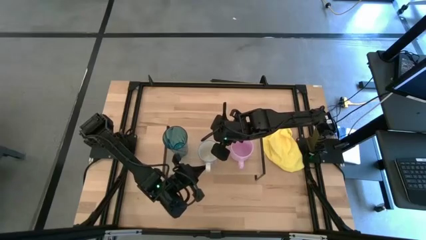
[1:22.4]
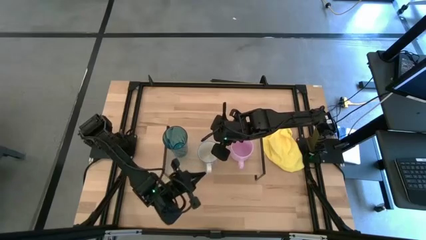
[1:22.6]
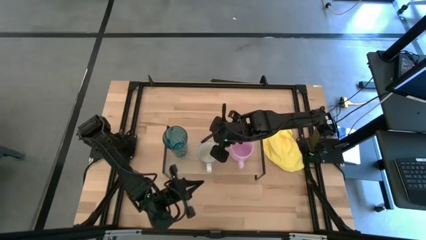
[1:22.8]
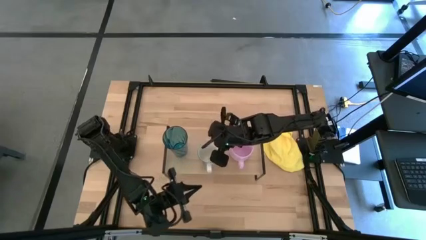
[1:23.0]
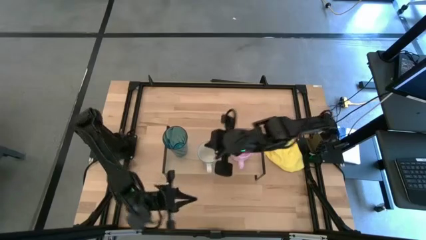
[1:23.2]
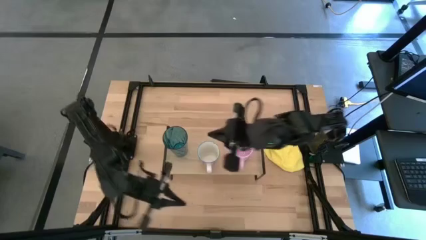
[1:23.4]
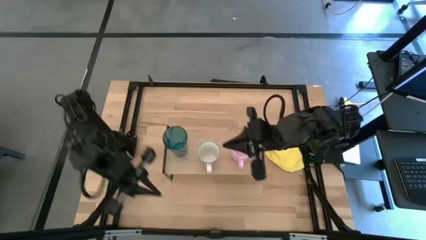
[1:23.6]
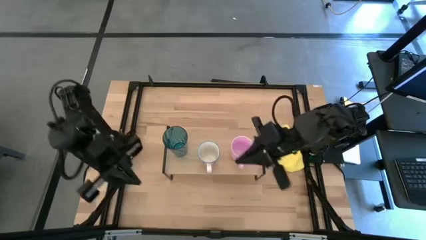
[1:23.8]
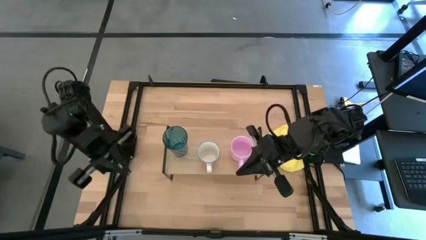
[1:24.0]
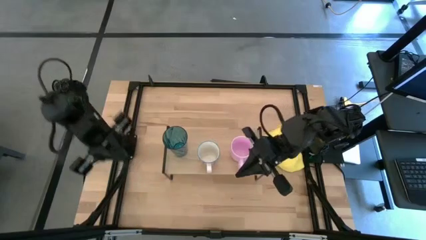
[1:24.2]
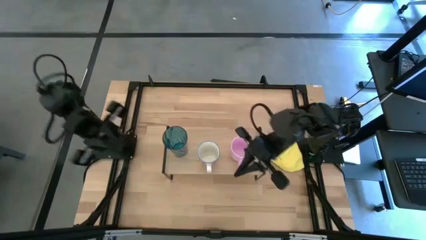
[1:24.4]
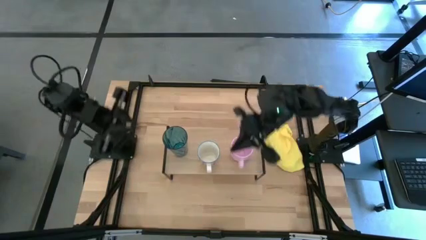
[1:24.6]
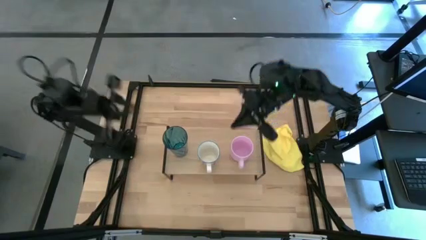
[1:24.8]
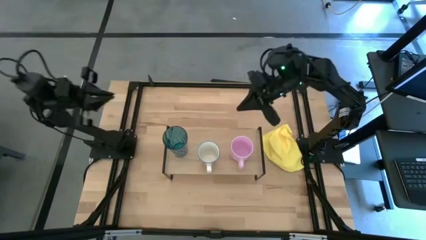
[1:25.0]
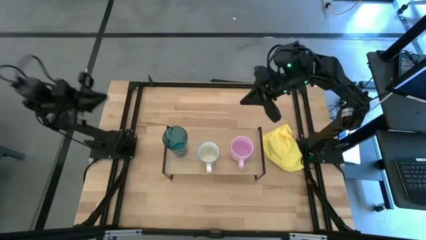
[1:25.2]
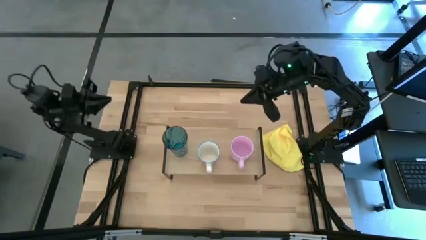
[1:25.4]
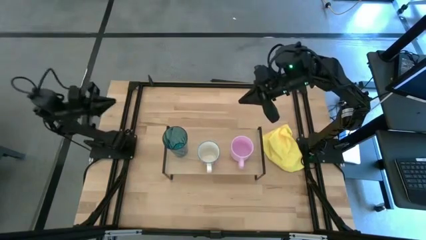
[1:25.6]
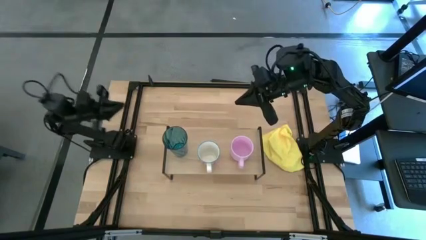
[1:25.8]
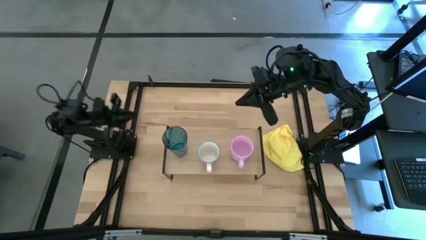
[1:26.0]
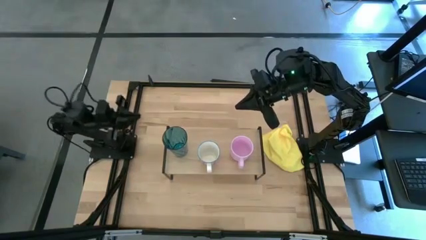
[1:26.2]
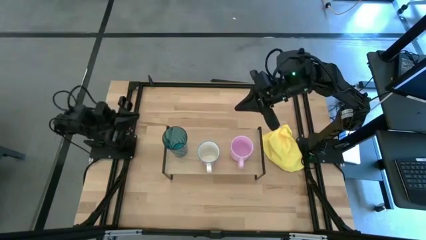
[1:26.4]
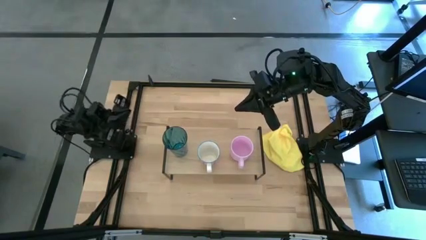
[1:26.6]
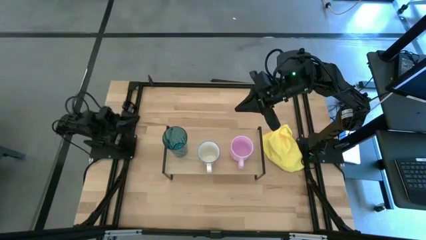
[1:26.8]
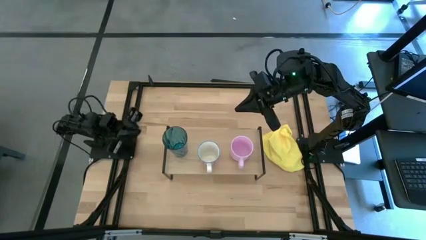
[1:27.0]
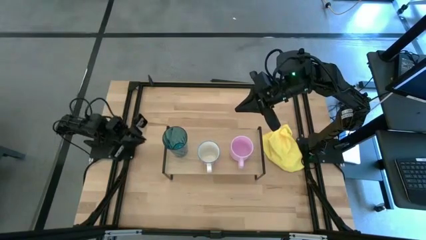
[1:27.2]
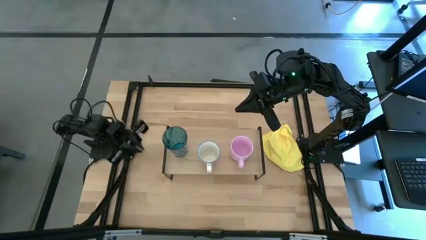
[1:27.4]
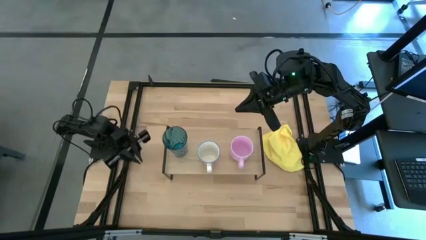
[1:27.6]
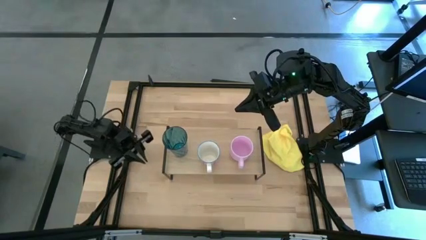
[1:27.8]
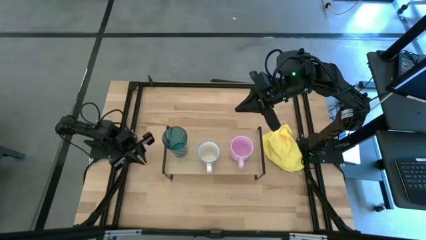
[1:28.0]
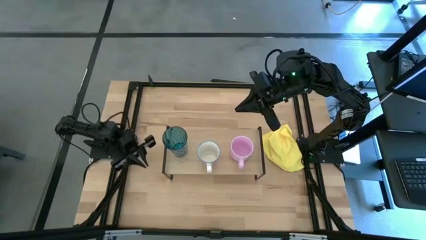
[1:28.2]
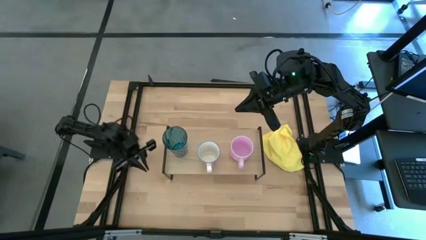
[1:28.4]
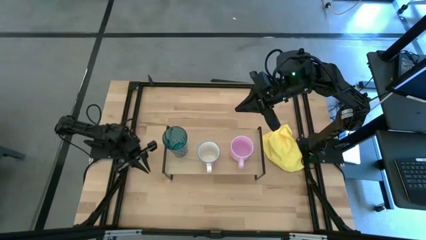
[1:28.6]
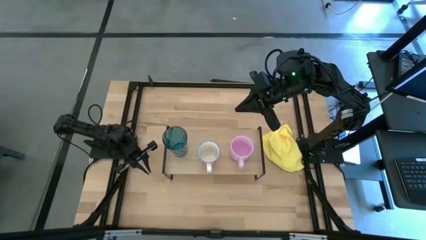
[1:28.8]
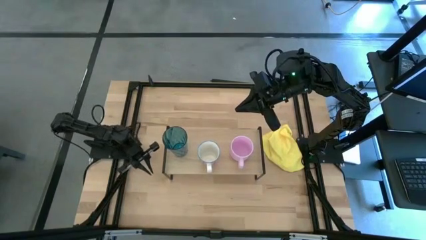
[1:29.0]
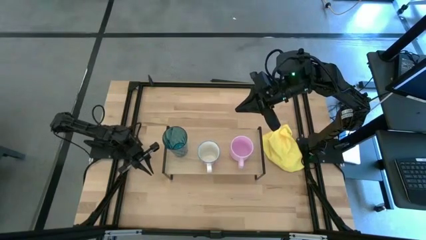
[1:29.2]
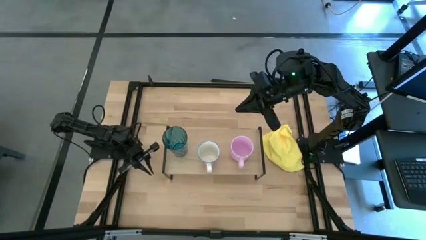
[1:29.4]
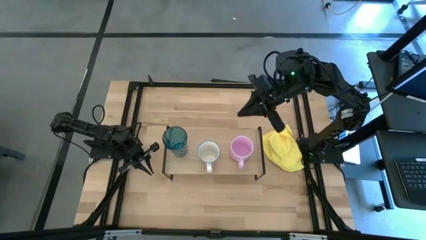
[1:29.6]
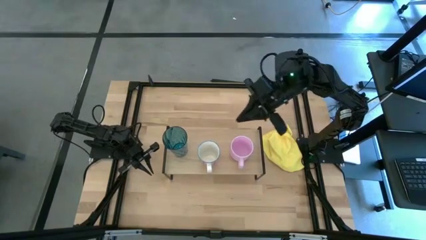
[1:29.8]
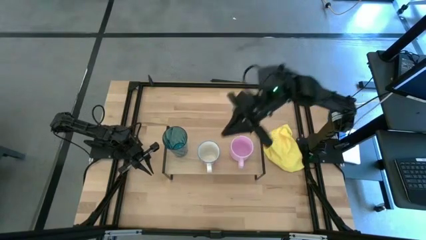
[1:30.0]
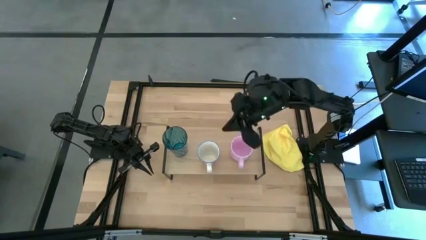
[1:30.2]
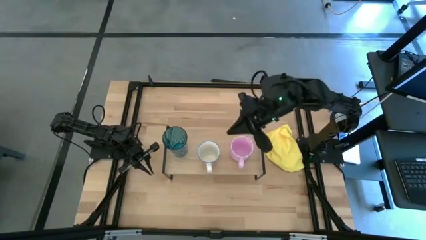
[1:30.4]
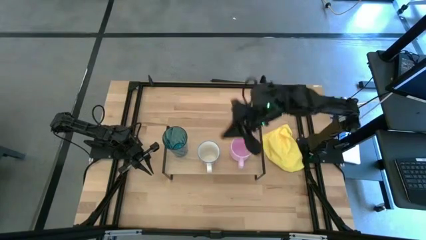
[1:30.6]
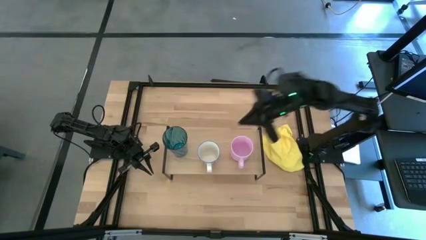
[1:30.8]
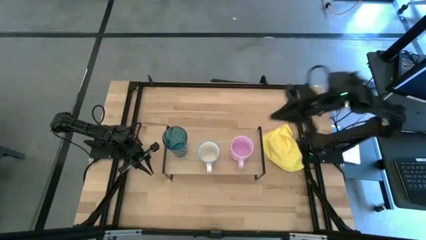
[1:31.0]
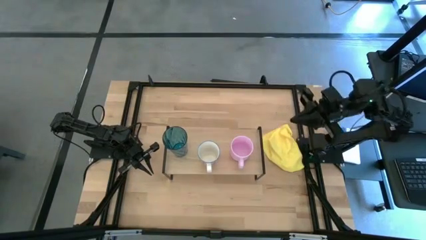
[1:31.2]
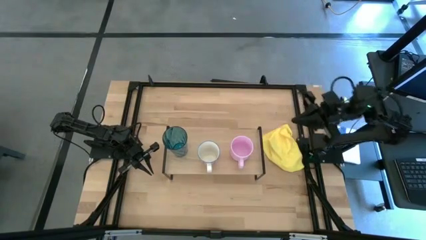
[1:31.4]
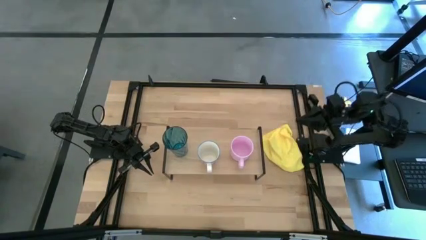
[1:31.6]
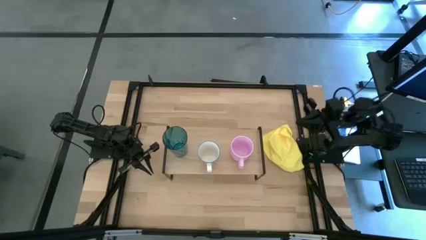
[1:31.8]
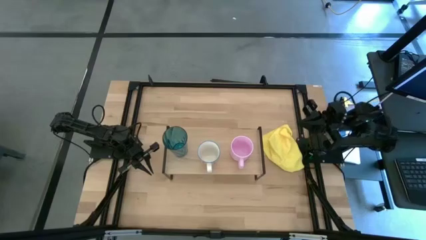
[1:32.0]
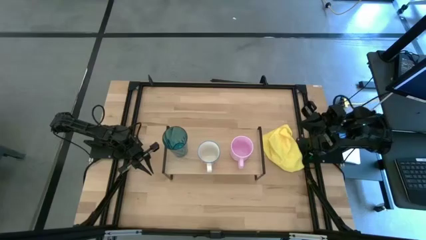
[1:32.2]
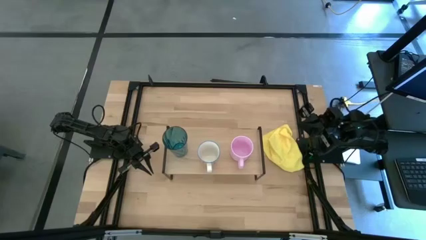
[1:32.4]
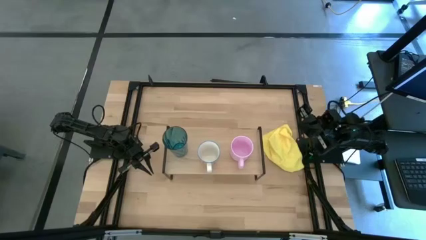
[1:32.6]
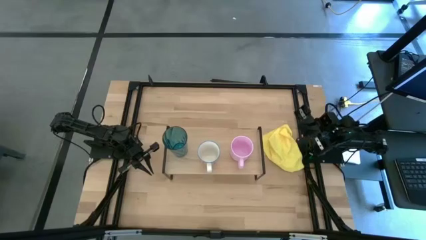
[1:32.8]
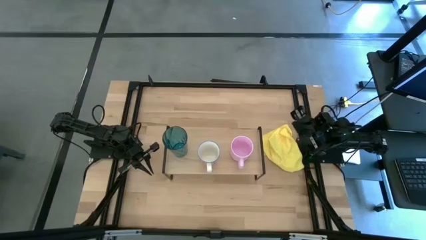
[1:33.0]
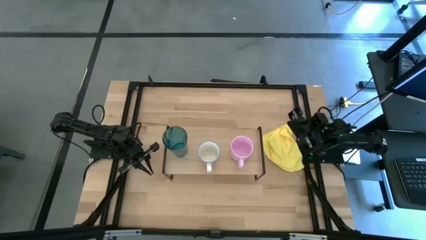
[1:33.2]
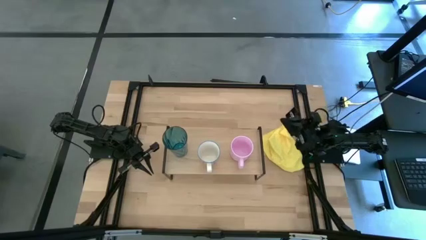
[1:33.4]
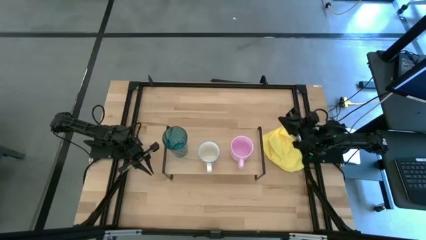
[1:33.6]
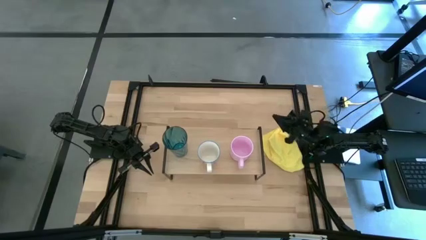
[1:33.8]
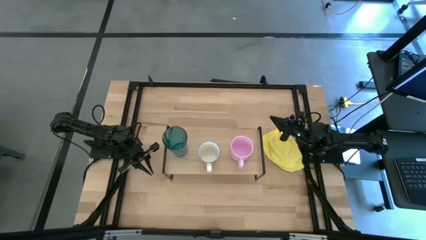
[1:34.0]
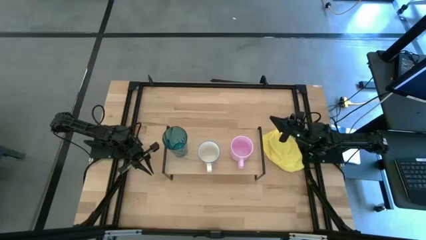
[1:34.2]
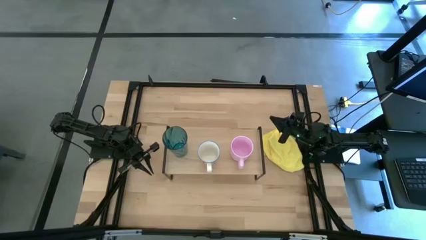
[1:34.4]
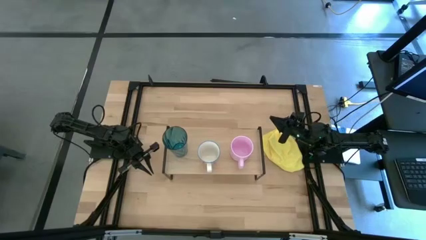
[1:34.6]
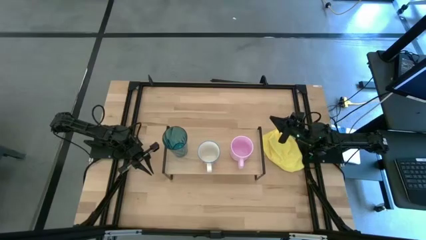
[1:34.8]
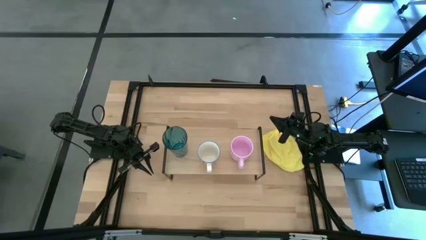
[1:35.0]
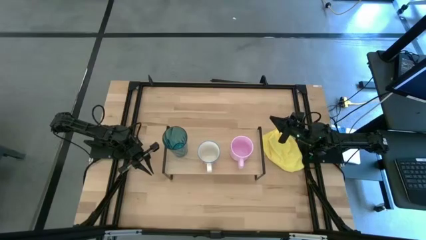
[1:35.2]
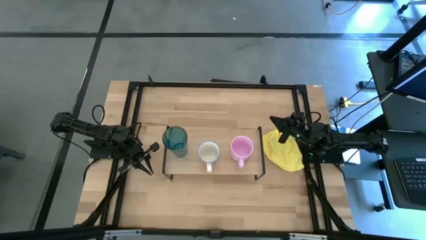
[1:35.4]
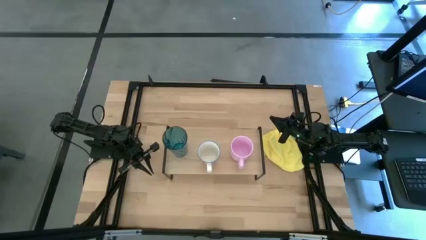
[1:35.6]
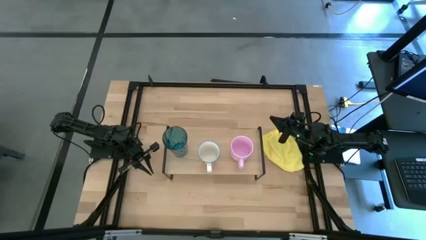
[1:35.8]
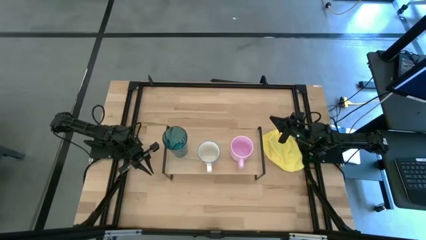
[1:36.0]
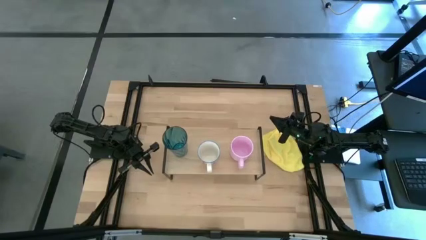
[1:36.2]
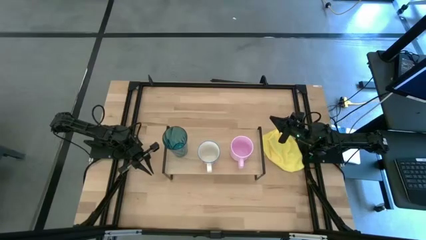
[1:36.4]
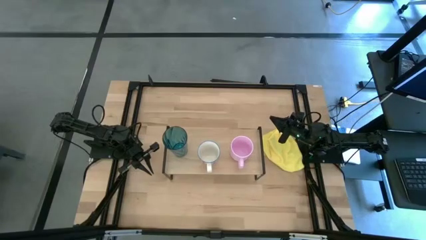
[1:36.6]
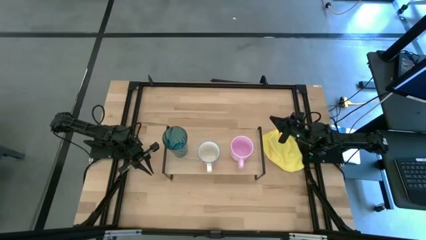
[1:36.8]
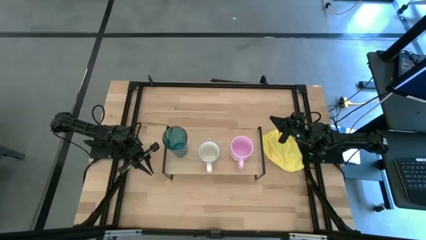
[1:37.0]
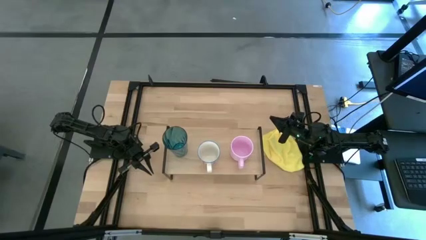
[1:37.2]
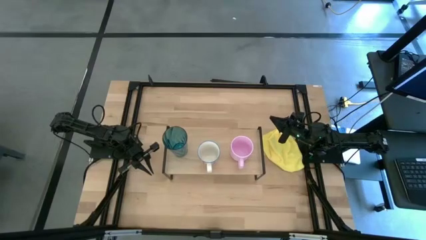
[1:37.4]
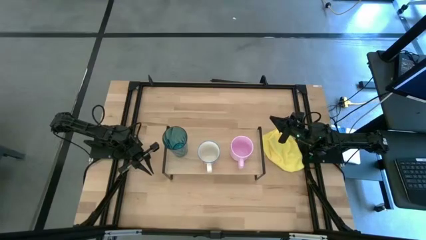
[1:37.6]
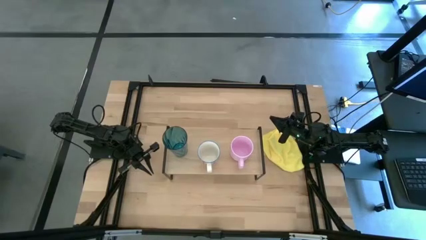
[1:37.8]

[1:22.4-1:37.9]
Task: Stack small to large cups/mugs on shelf
Return to Home Position
